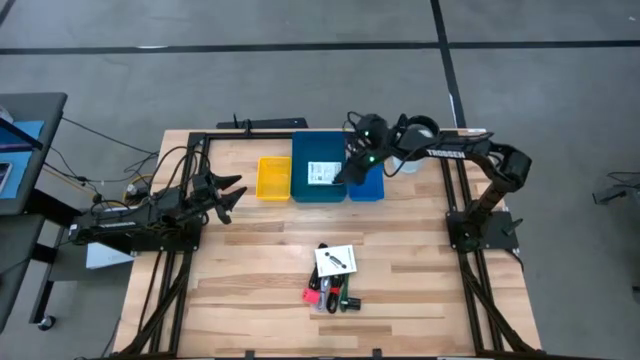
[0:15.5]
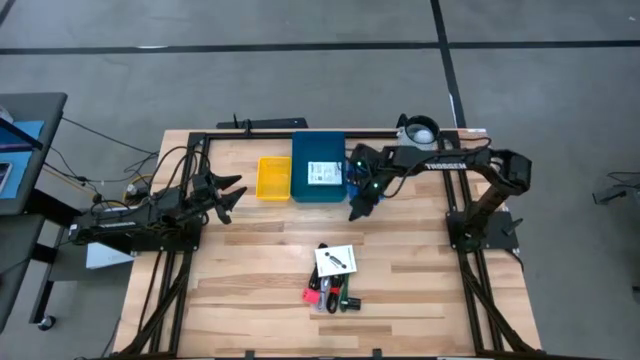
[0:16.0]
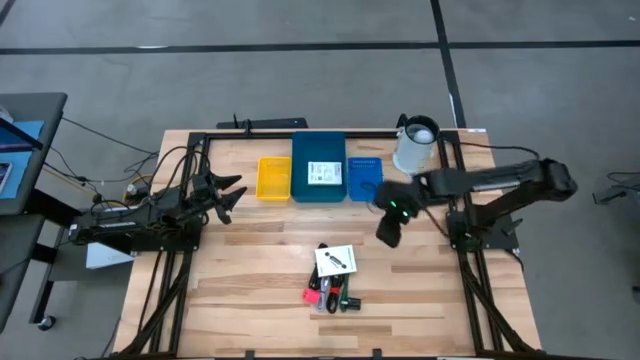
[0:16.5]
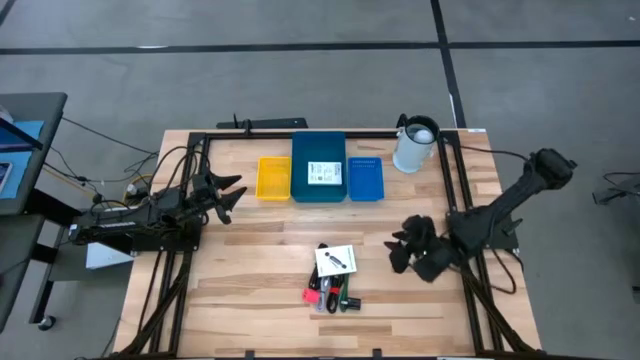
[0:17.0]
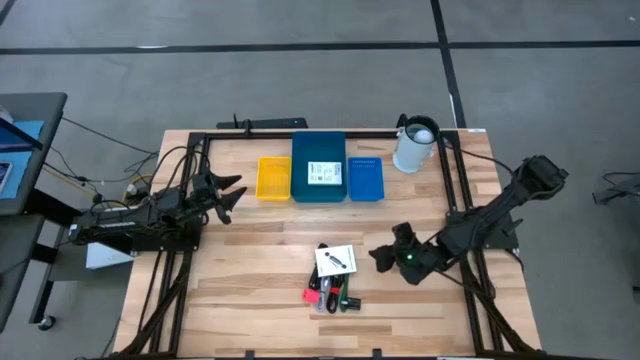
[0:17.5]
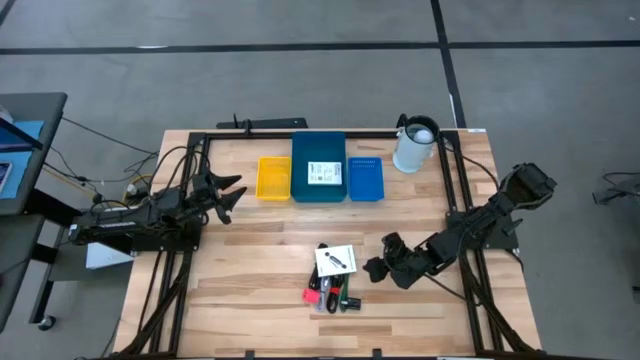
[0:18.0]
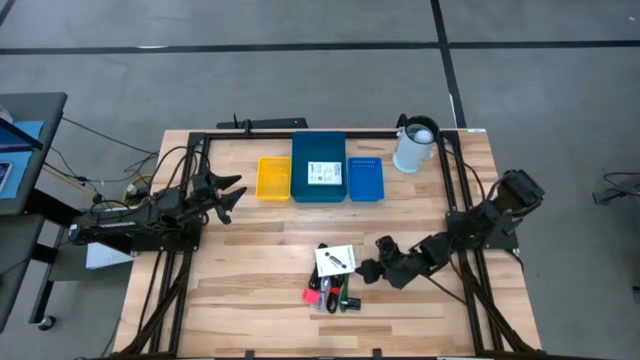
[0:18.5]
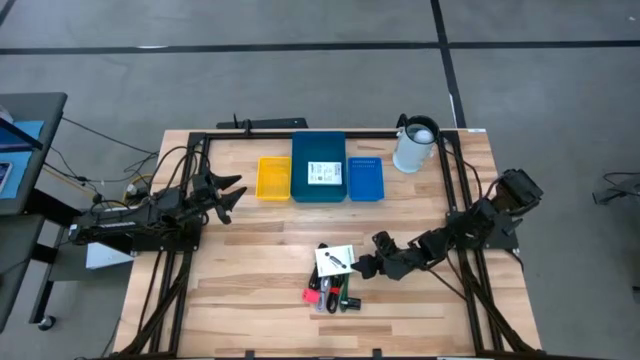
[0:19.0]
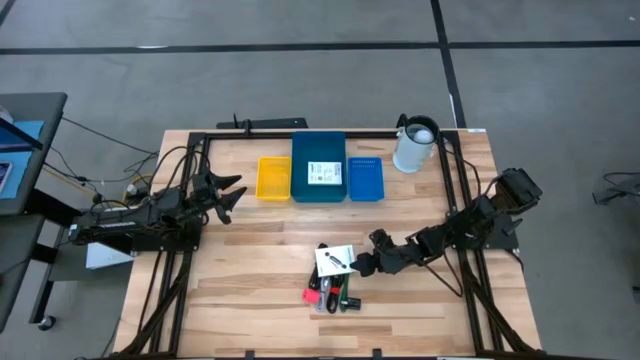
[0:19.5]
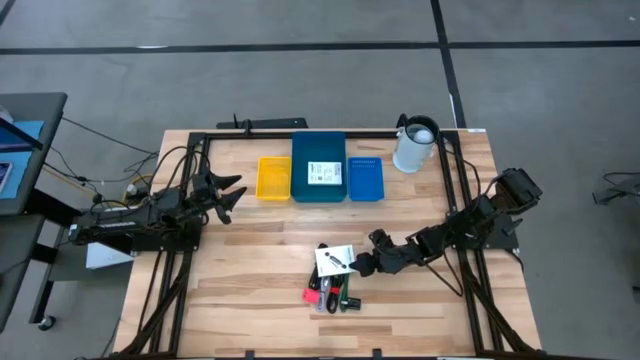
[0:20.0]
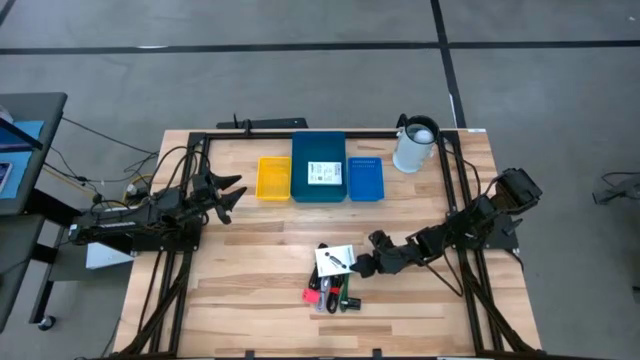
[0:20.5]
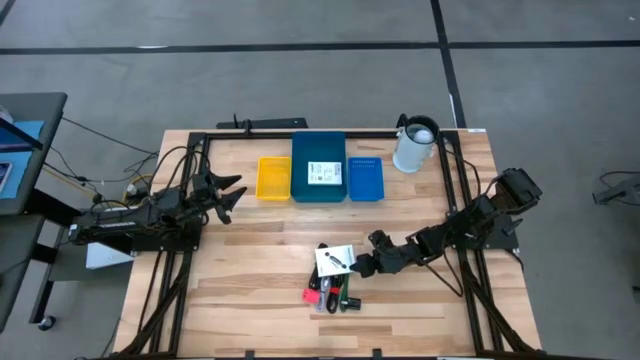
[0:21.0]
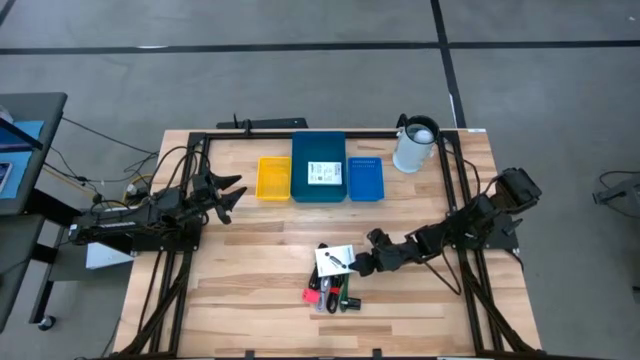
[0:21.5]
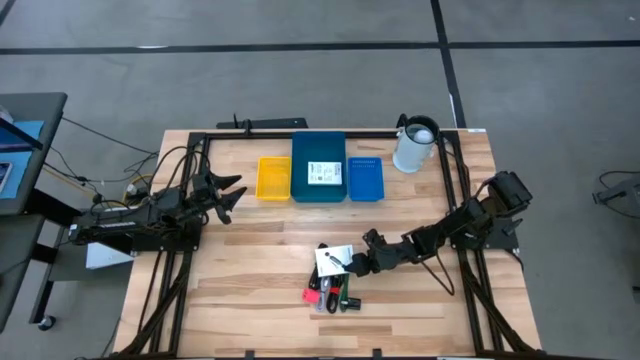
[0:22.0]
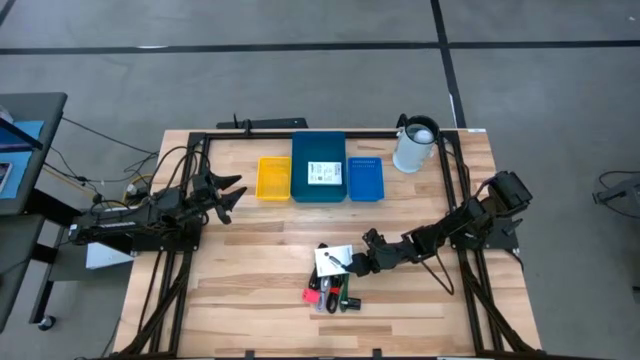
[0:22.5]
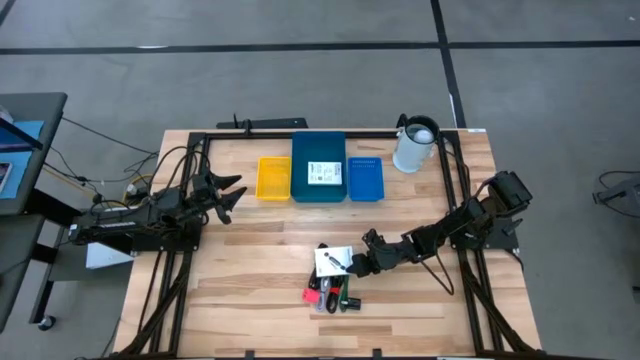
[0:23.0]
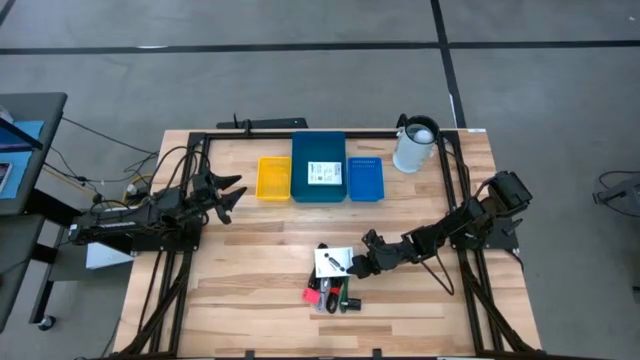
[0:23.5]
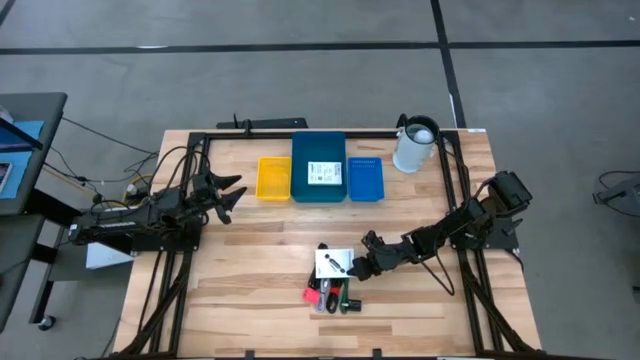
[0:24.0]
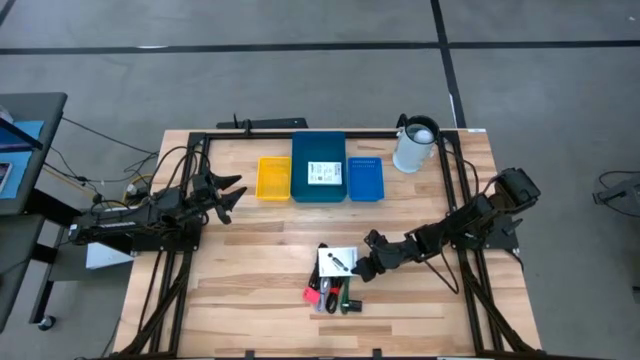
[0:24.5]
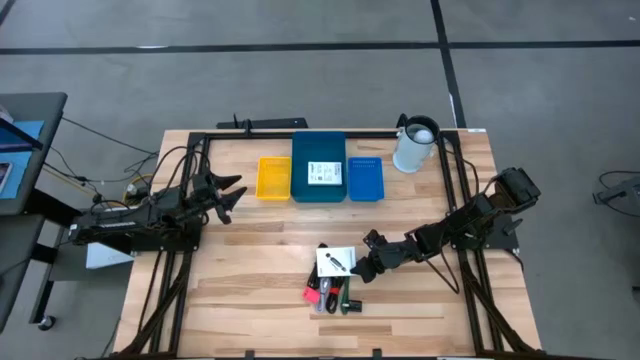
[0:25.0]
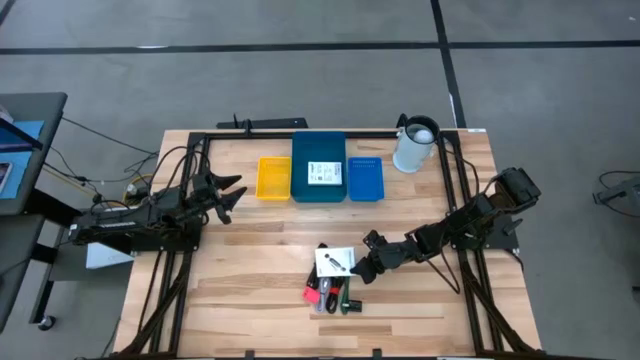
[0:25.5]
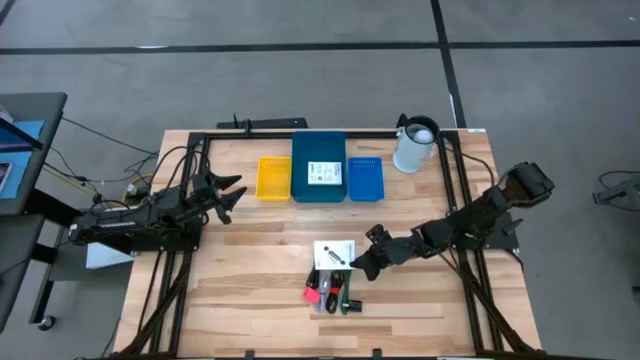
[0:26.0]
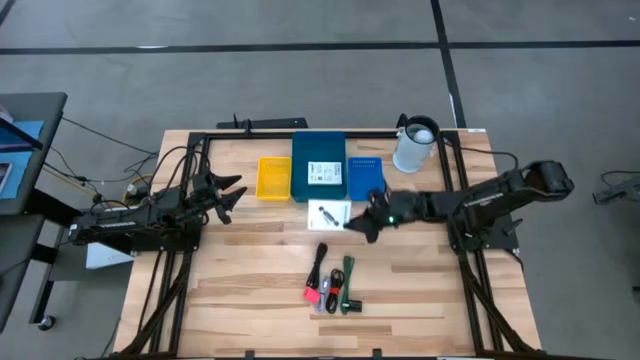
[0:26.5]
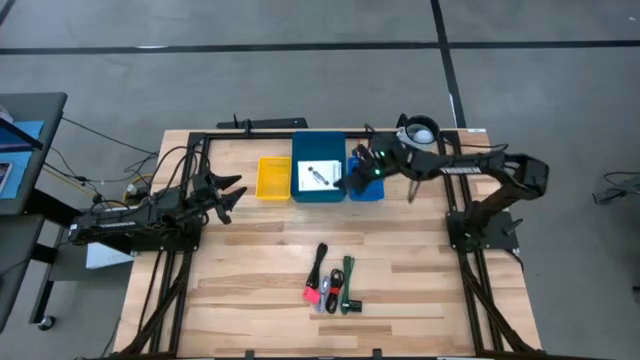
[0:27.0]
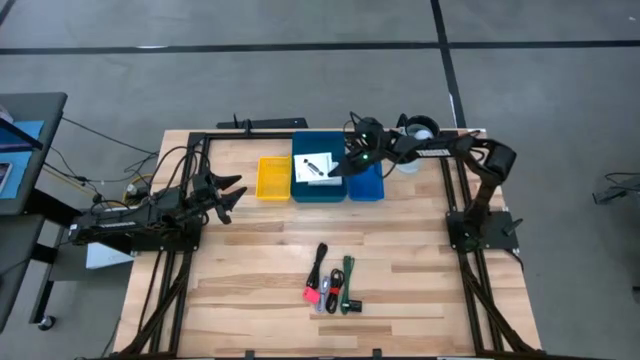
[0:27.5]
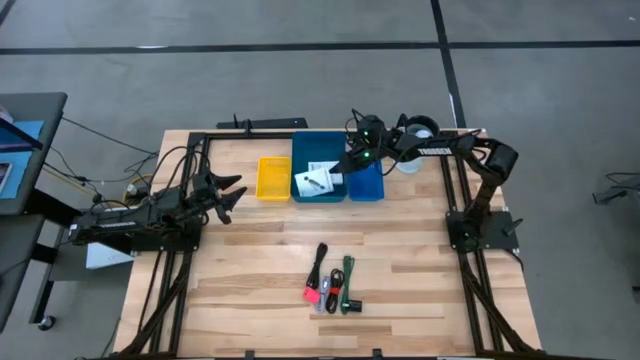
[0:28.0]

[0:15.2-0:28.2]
Task: Pick and place items into bin
Put the white box into the dark blue bin

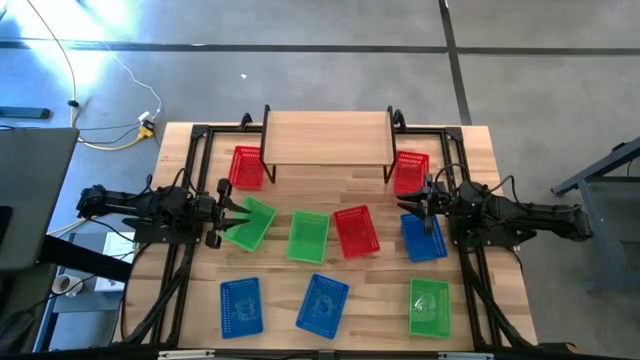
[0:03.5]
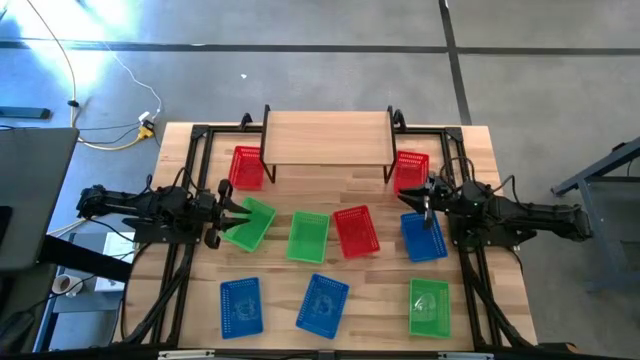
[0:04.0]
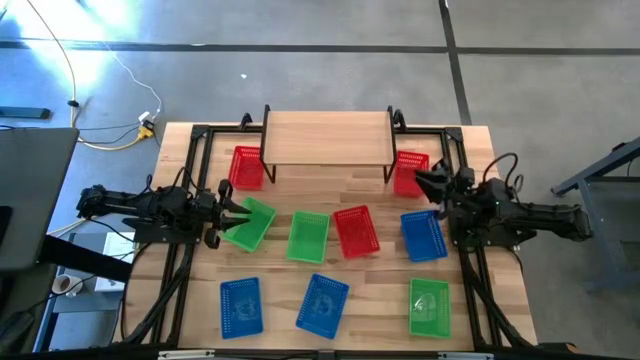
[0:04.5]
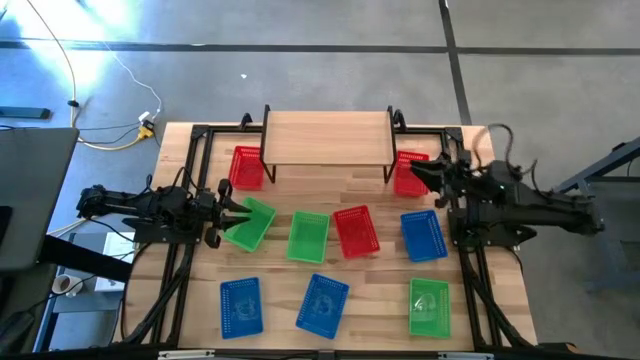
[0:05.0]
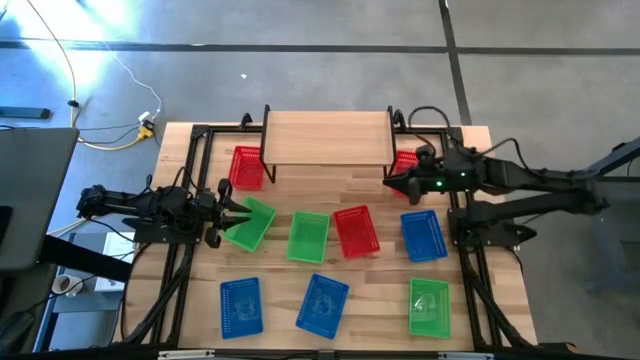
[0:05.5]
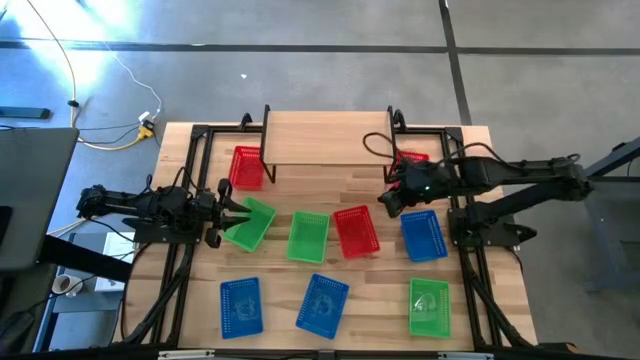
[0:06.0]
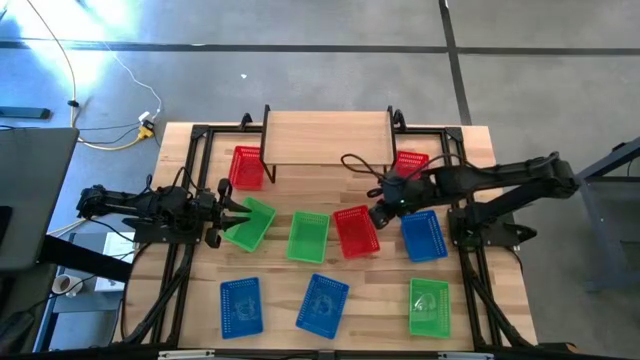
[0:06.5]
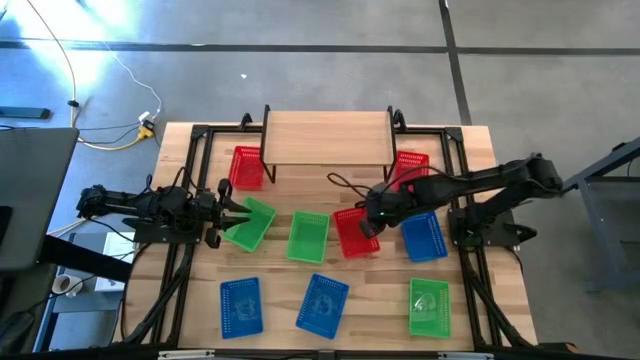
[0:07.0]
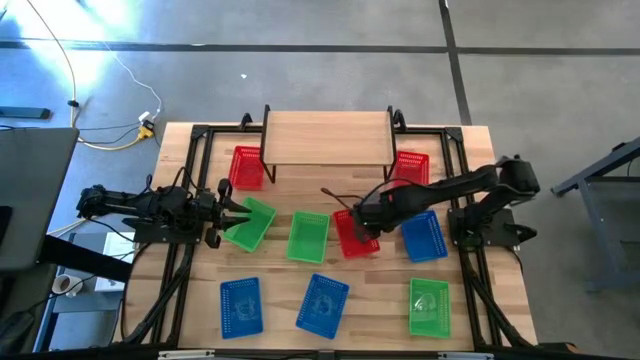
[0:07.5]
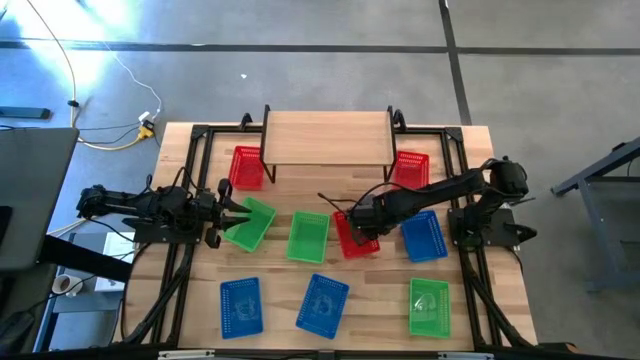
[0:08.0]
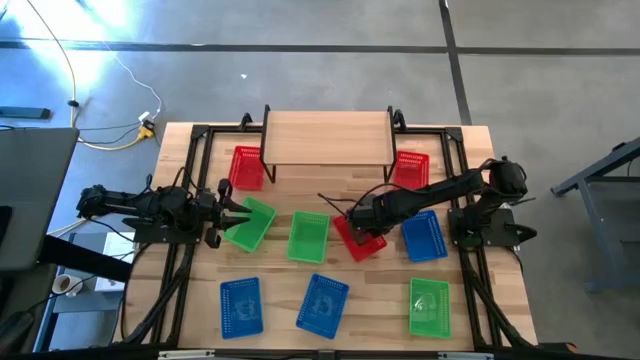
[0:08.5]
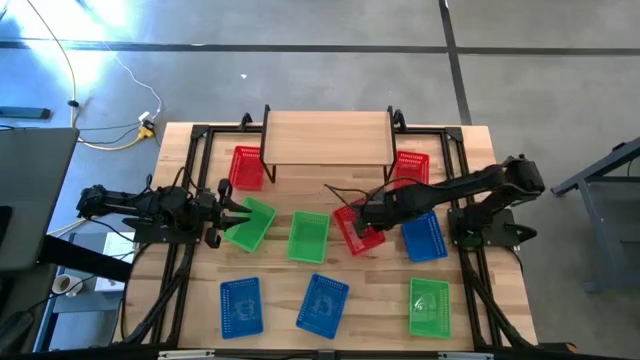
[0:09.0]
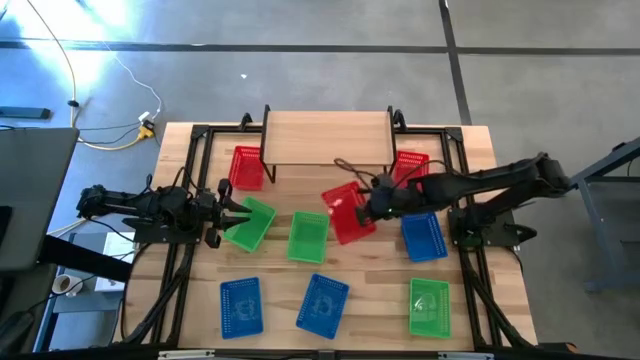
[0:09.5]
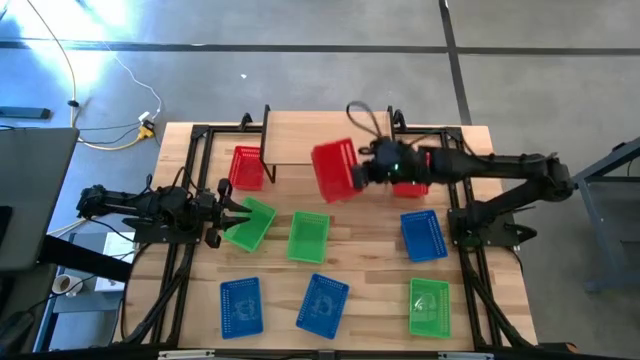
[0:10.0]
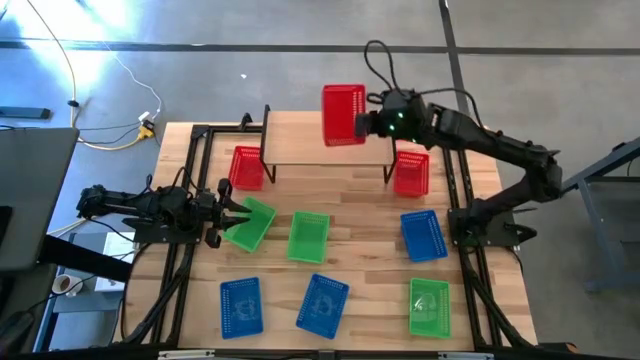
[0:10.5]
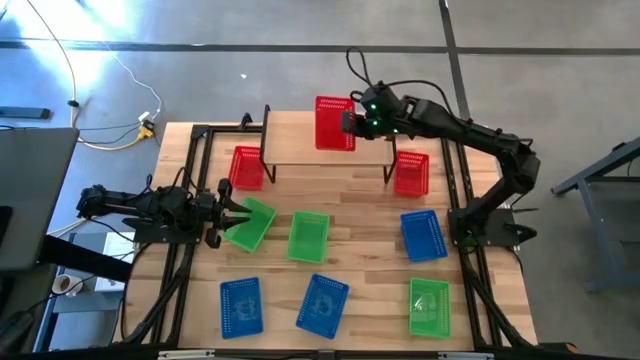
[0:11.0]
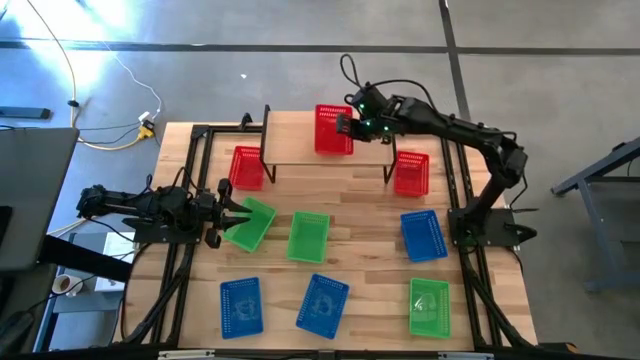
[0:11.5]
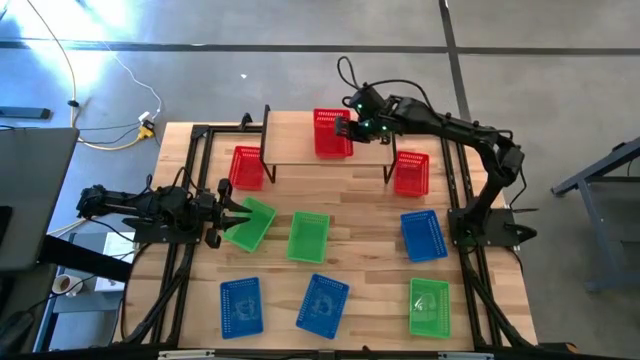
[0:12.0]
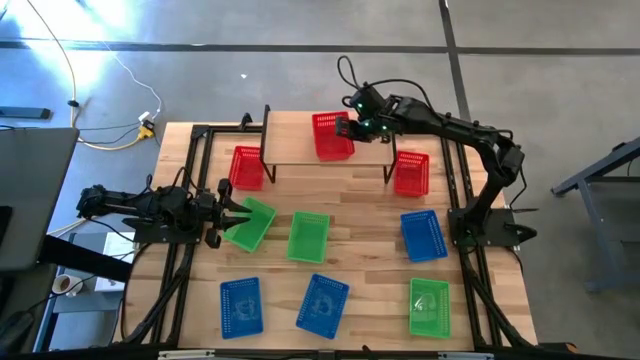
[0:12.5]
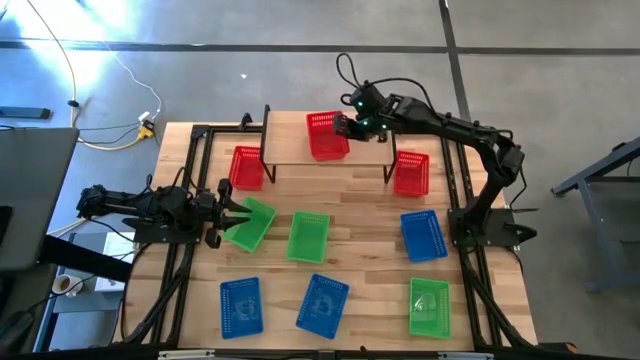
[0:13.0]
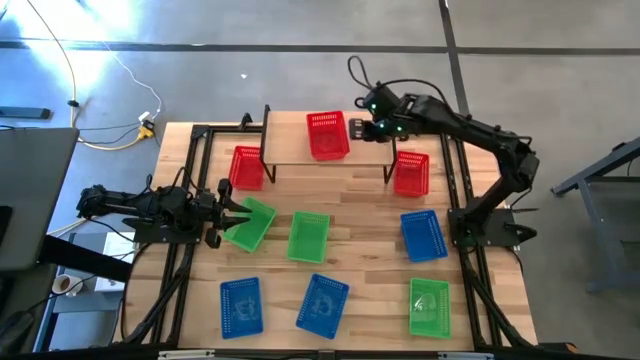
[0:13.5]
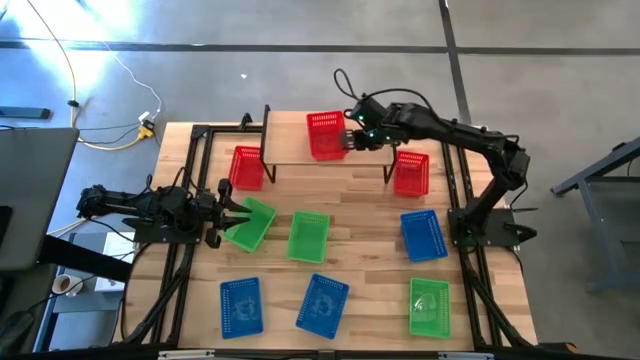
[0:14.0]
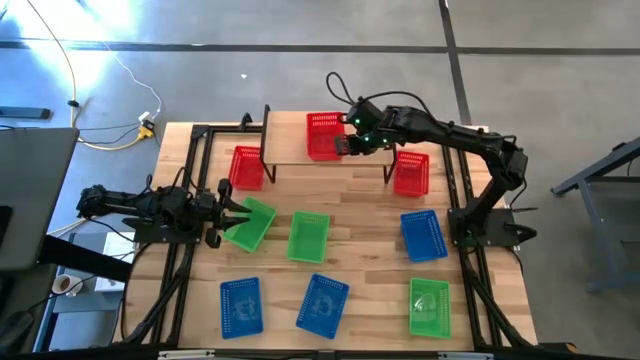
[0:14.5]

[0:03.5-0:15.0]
Task: Stack baskets on shelf by color
Put the bottom red bin on the shelf
